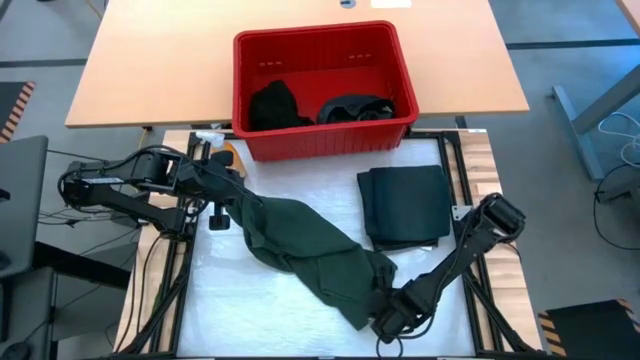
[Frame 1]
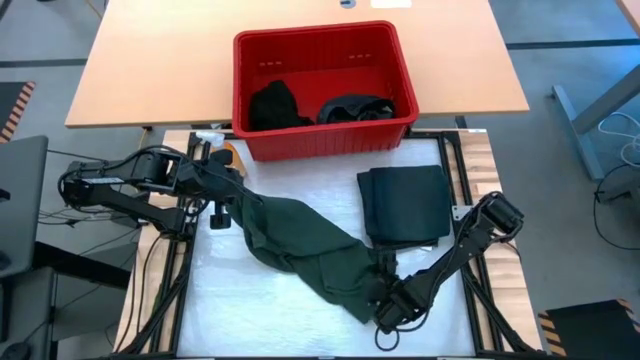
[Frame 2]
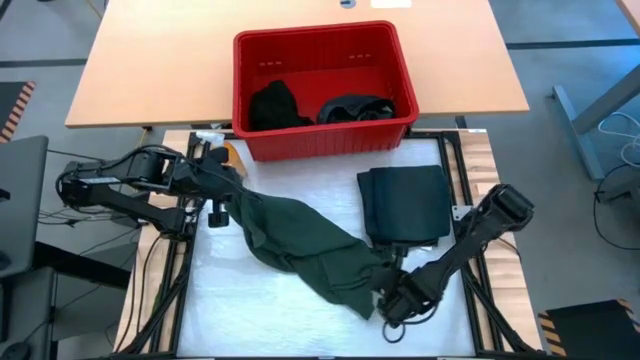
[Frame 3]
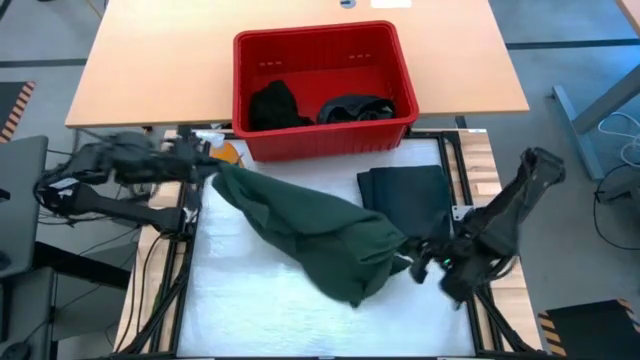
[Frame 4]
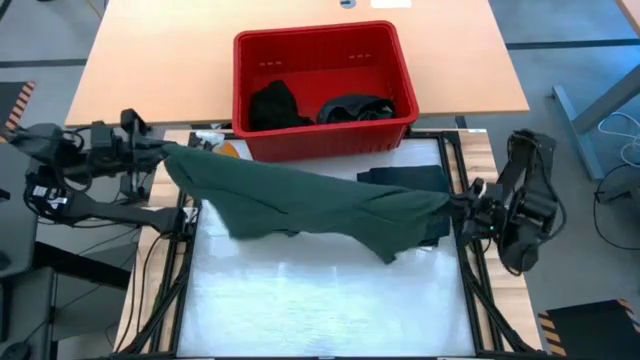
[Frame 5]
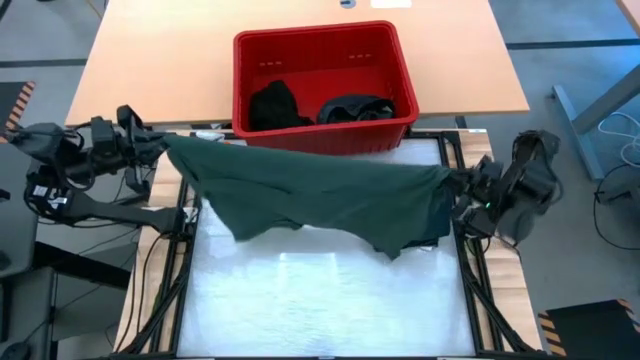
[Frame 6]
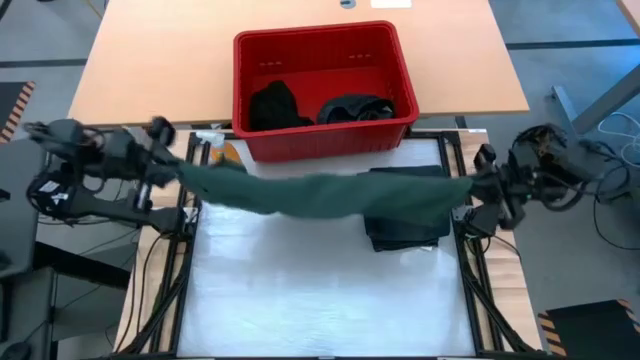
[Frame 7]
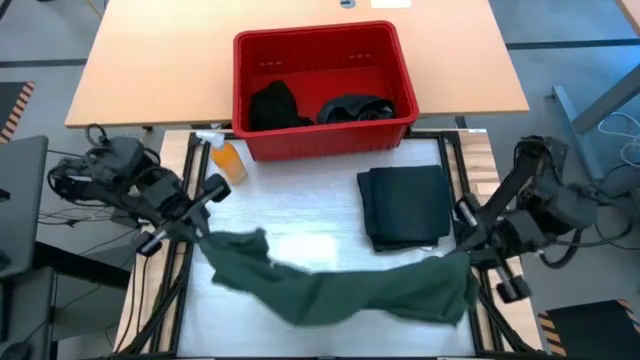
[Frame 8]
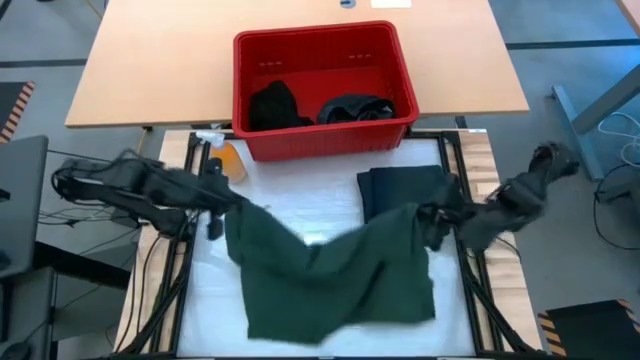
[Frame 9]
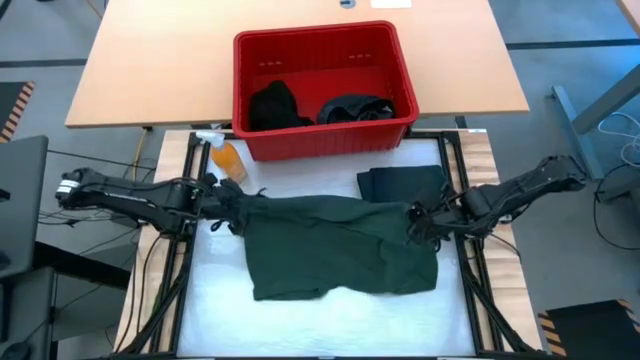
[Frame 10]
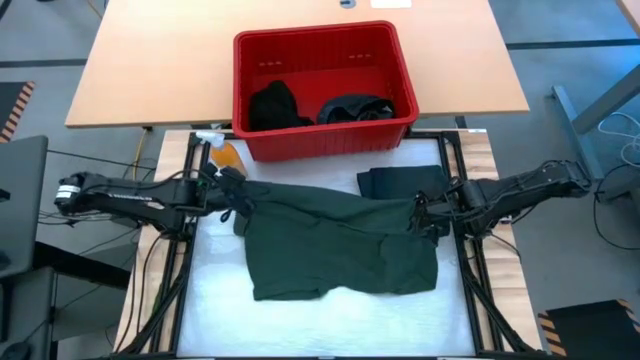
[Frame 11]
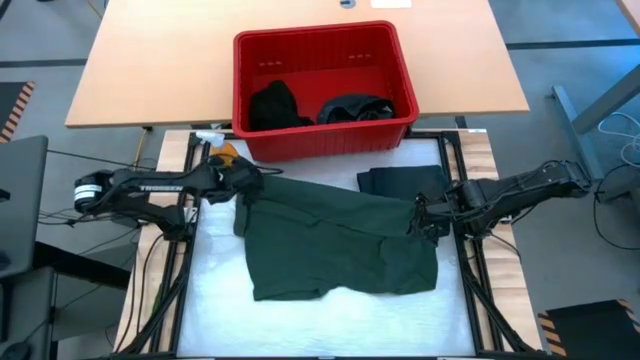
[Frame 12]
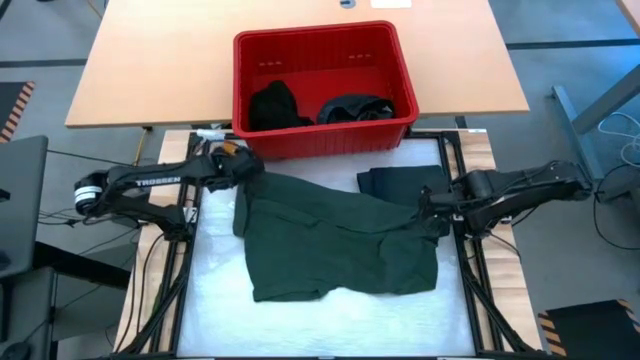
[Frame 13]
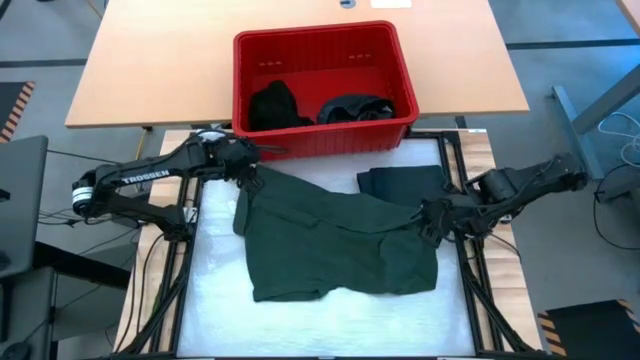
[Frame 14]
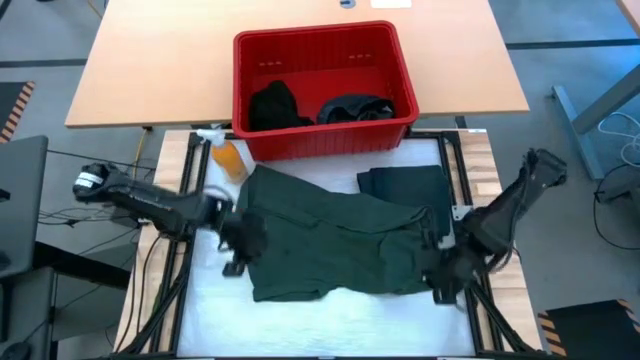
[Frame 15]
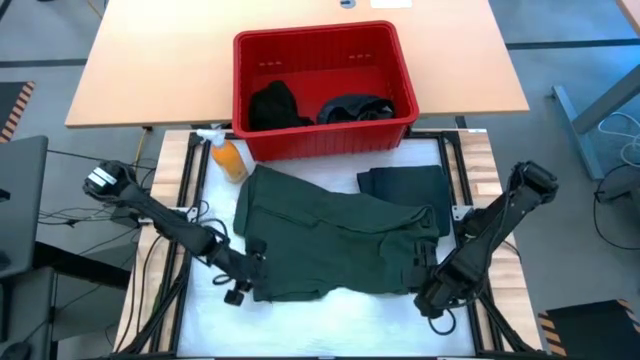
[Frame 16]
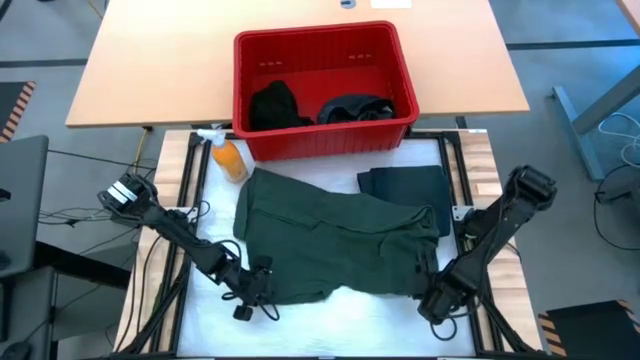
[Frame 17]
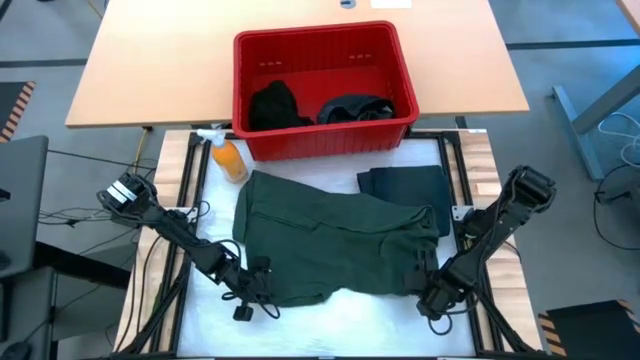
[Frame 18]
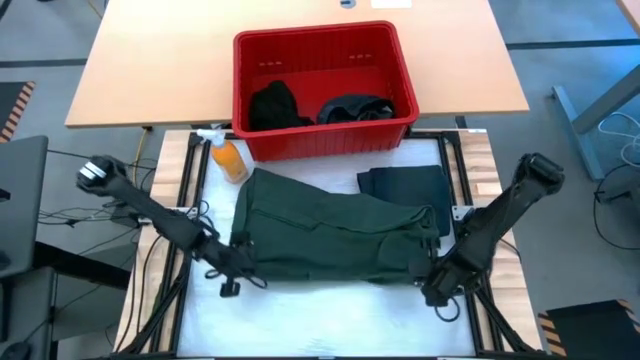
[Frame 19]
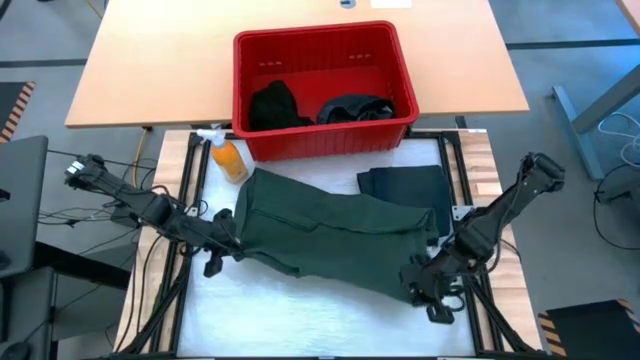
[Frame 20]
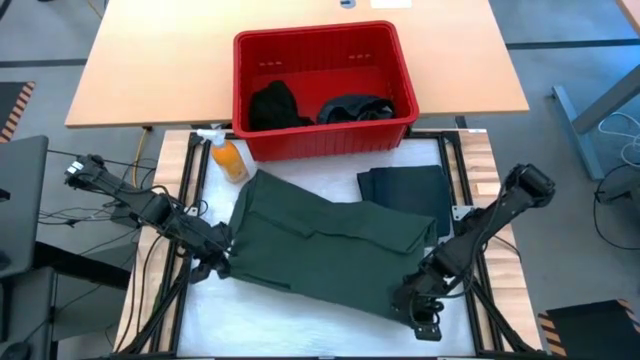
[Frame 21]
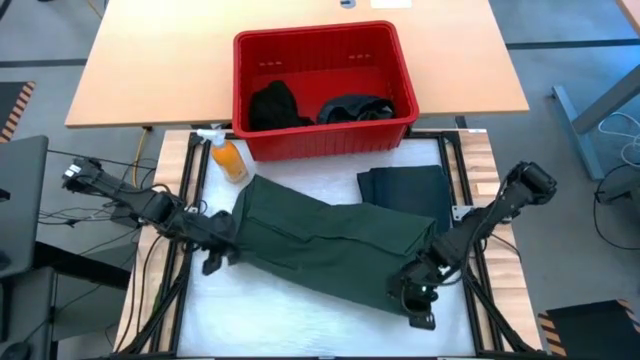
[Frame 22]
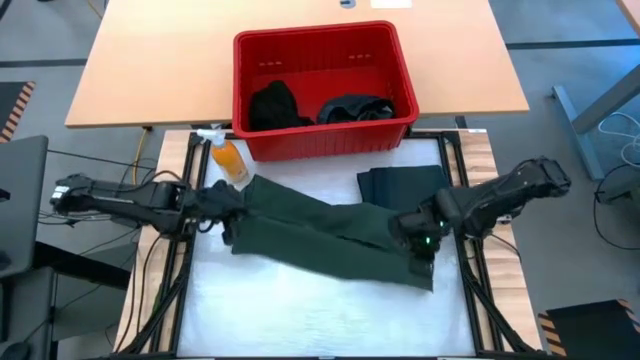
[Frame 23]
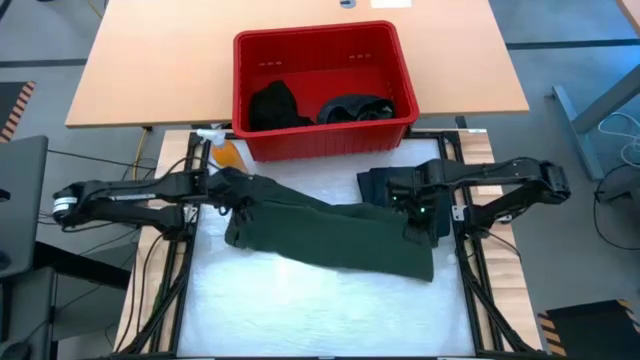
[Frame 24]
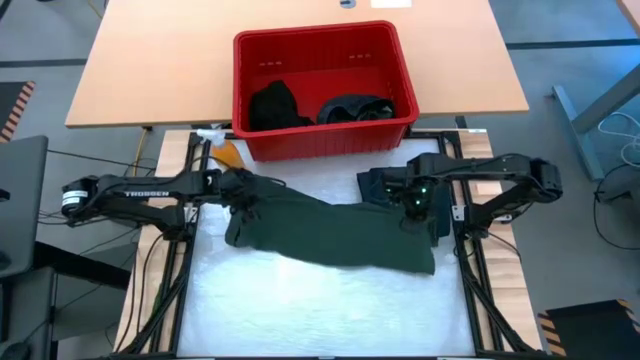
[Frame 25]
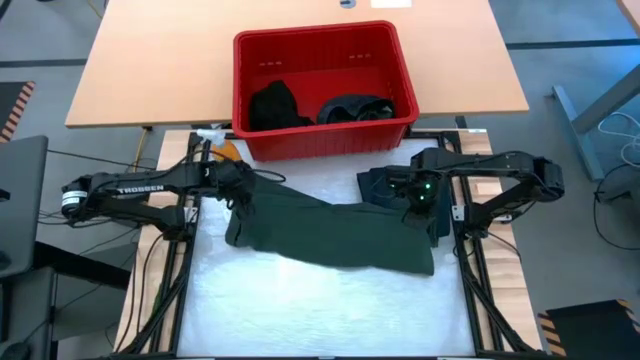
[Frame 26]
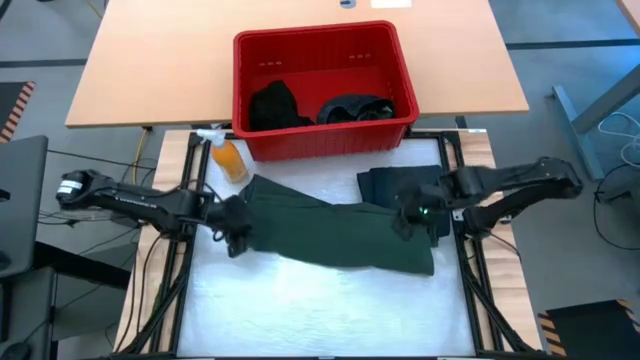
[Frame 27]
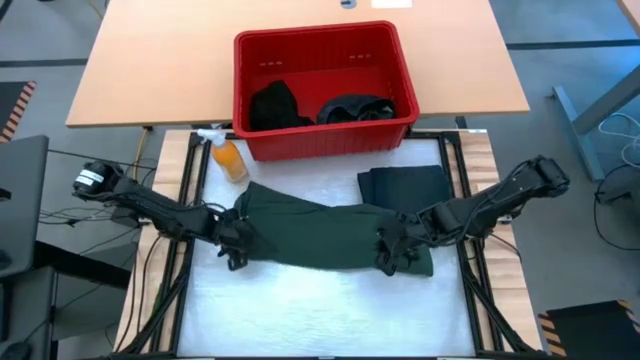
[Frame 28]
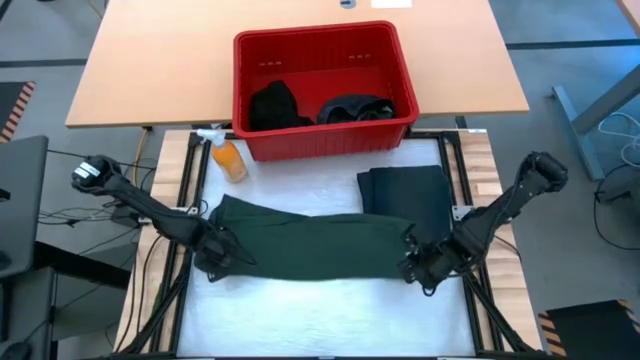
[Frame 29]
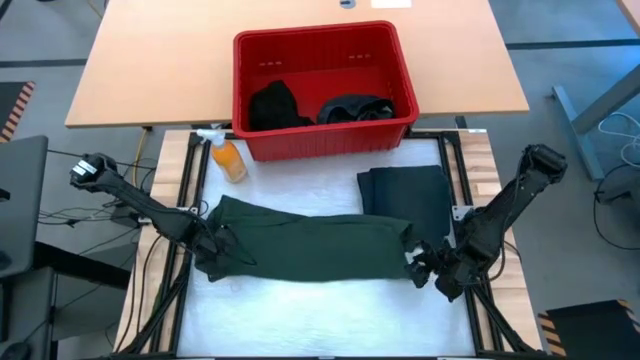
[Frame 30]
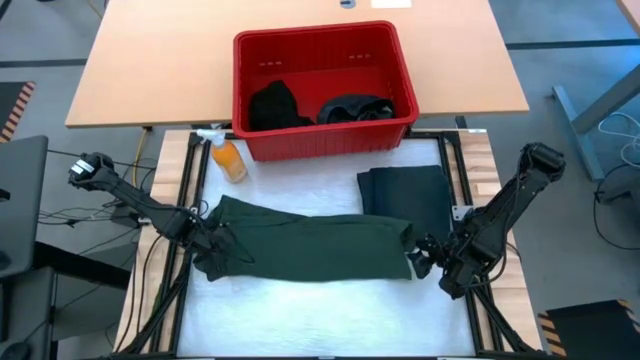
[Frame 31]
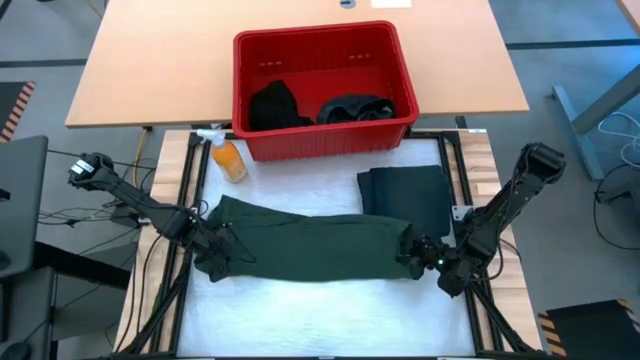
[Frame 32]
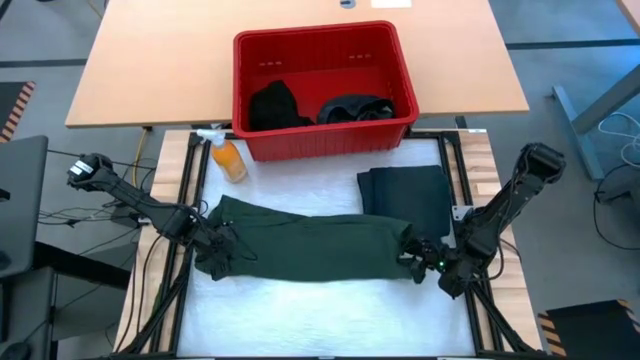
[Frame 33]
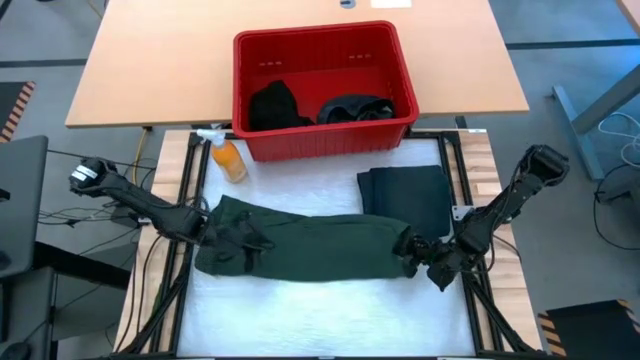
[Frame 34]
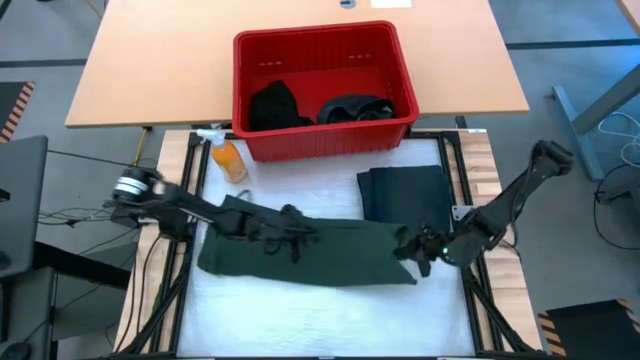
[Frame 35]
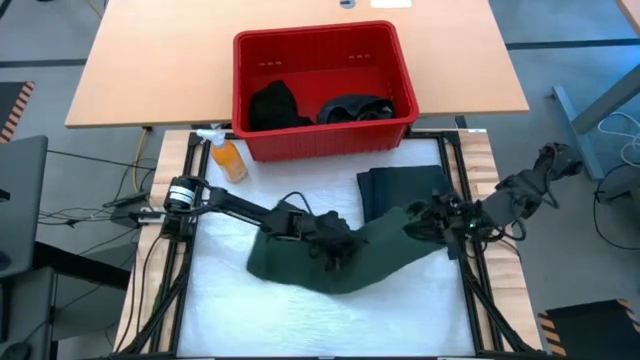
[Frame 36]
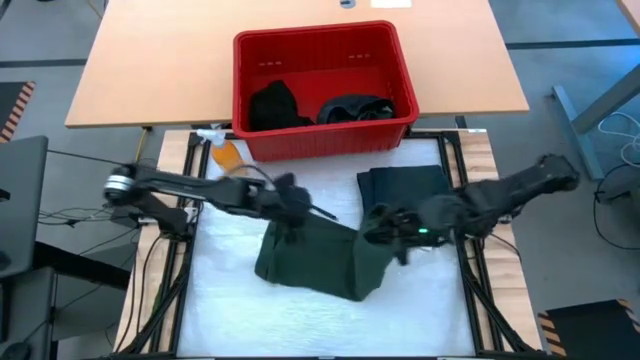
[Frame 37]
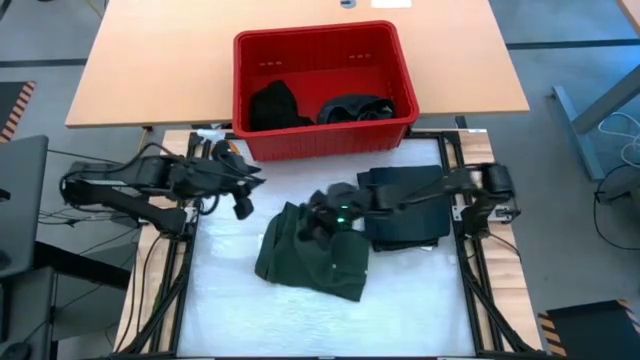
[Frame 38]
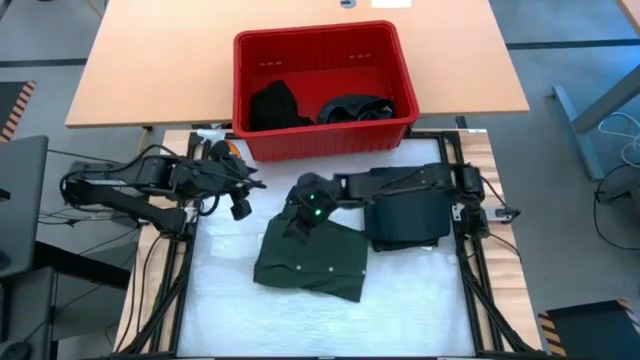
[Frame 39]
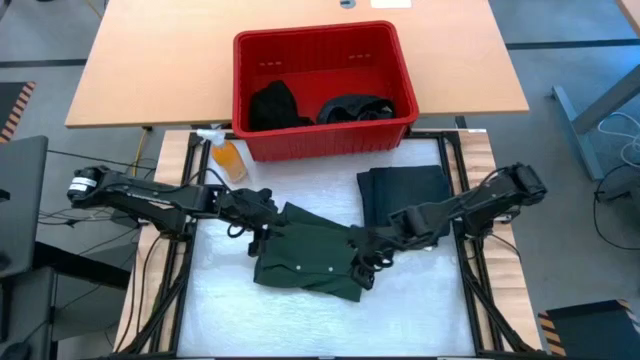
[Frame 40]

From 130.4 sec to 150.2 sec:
Task: Fold Laundry from Bin
Fold the green polo shirt

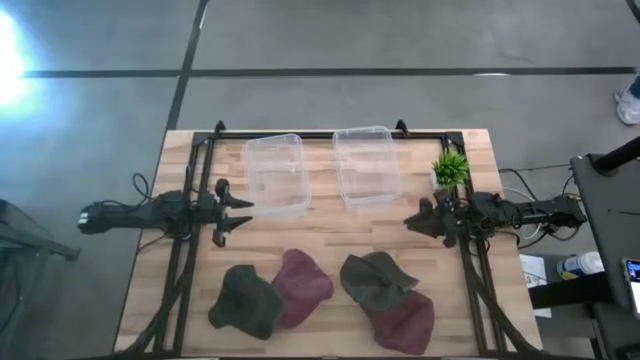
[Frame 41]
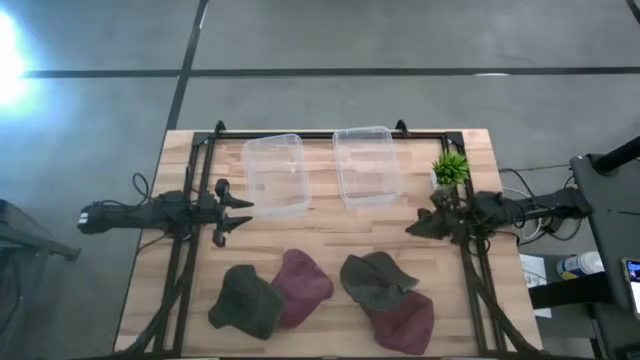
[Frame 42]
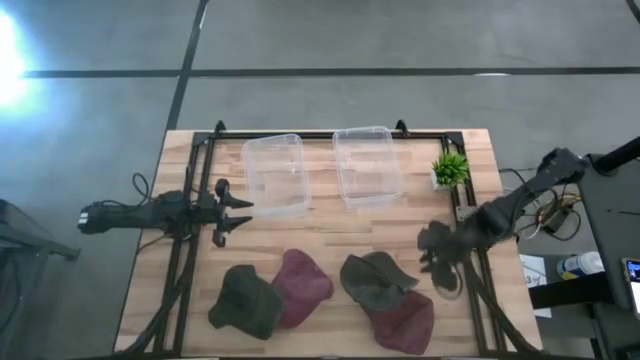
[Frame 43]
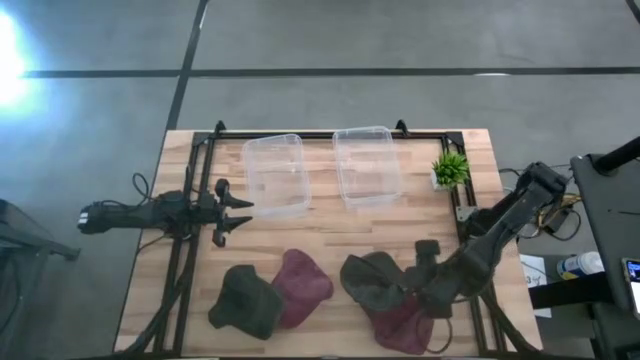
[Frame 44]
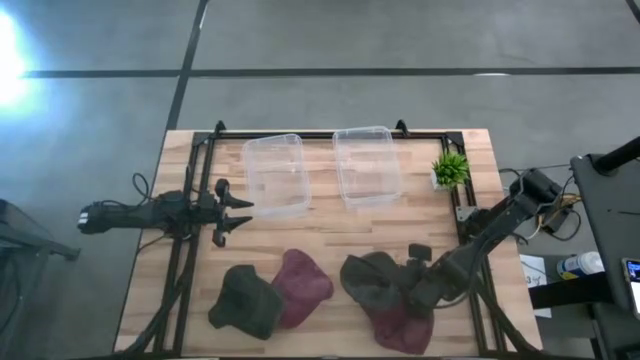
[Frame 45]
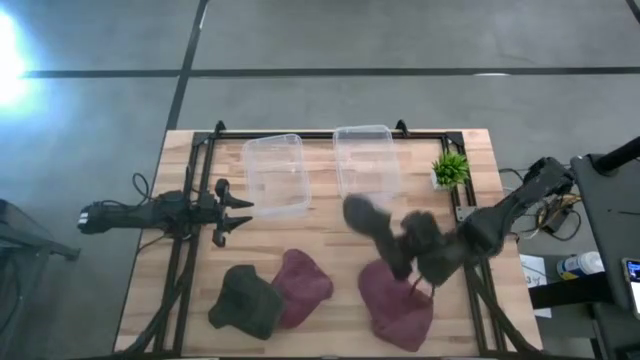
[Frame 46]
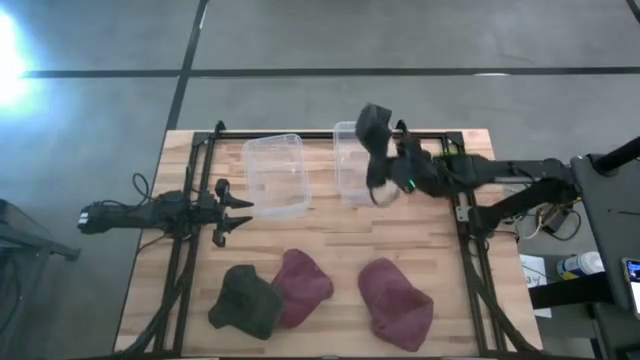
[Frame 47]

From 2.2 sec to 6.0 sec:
Task: Pick & Place hat
Put the right black cap into the right transparent bin
